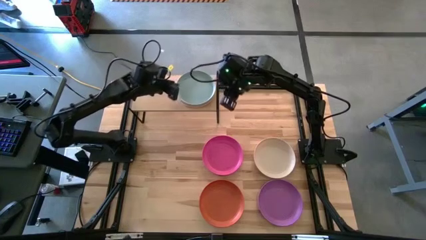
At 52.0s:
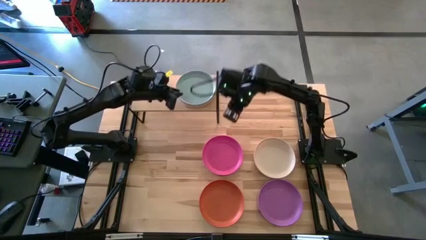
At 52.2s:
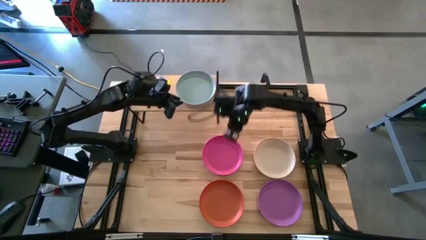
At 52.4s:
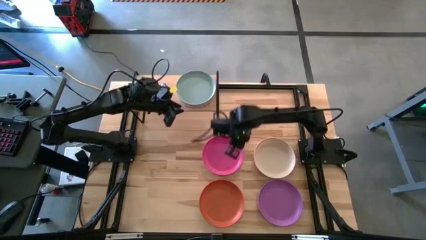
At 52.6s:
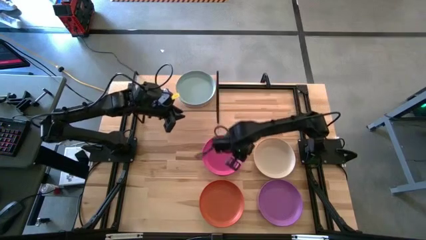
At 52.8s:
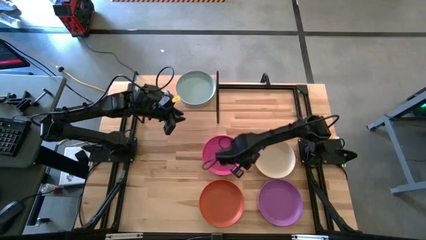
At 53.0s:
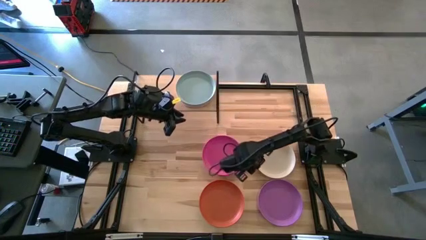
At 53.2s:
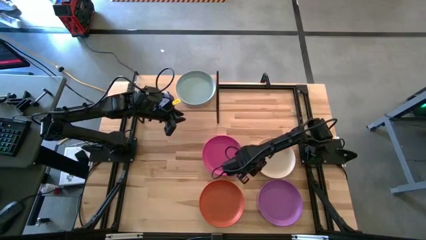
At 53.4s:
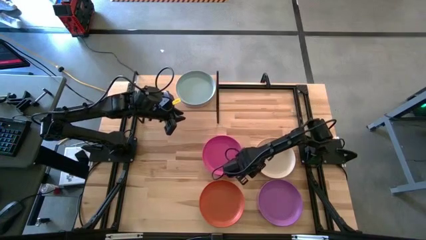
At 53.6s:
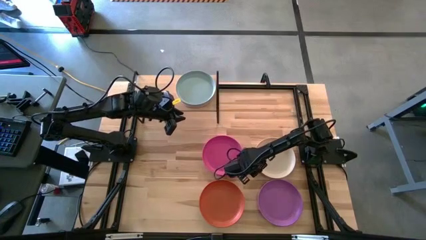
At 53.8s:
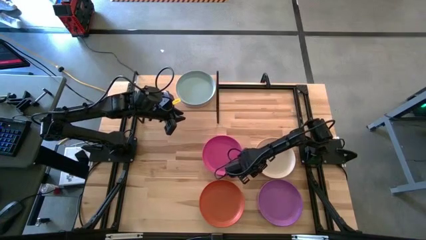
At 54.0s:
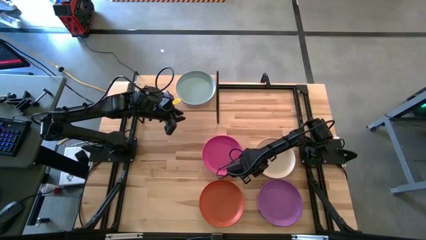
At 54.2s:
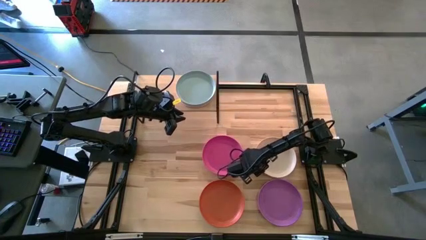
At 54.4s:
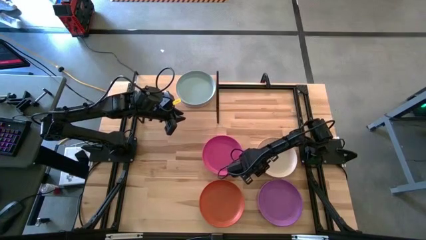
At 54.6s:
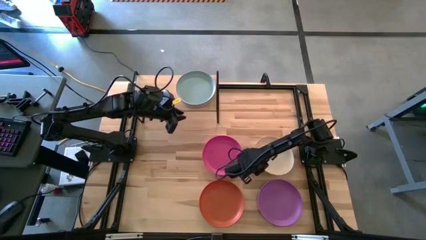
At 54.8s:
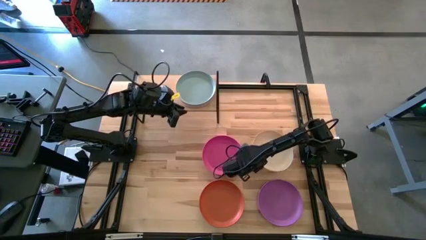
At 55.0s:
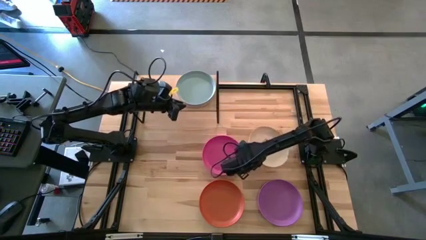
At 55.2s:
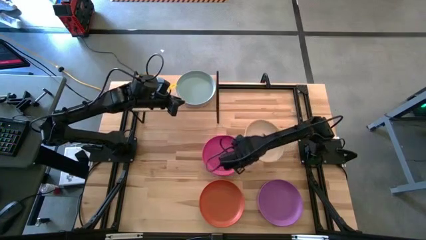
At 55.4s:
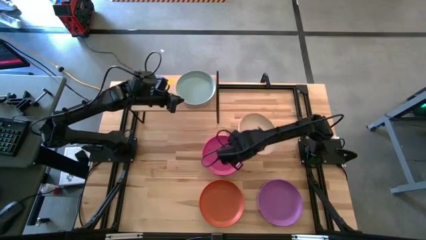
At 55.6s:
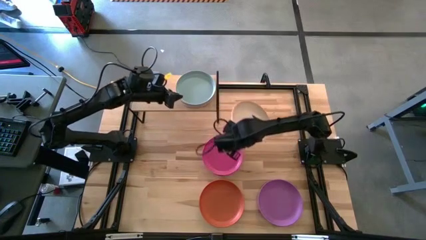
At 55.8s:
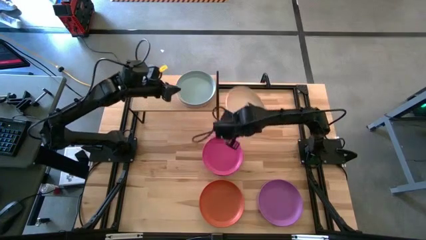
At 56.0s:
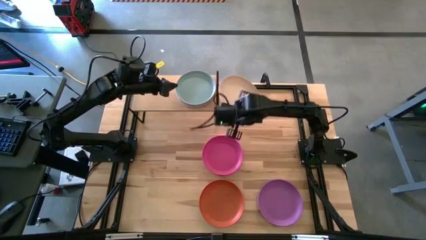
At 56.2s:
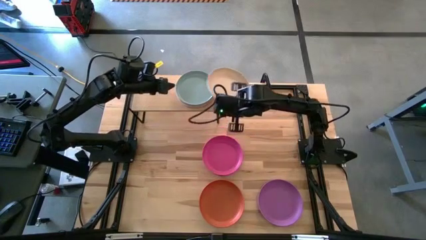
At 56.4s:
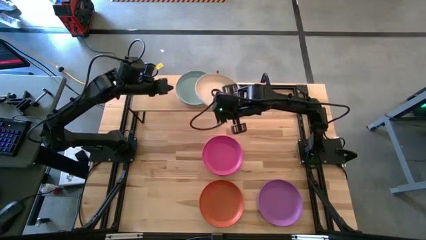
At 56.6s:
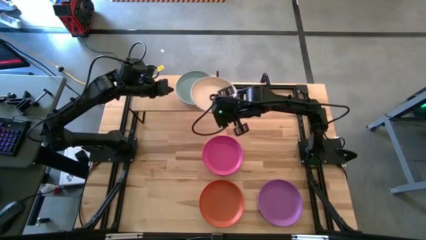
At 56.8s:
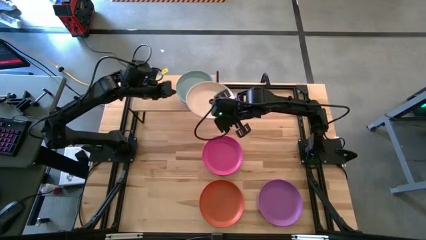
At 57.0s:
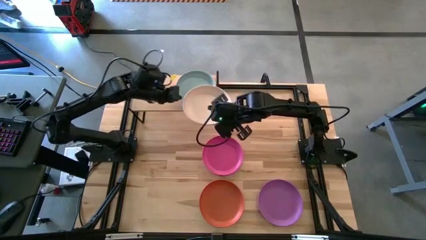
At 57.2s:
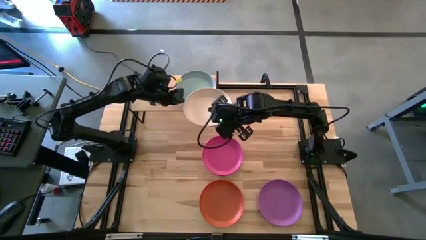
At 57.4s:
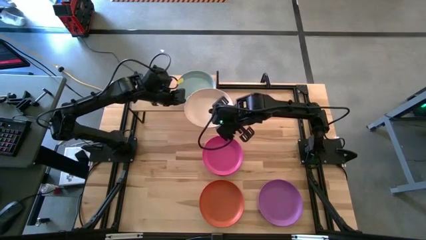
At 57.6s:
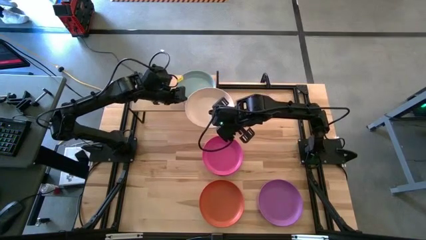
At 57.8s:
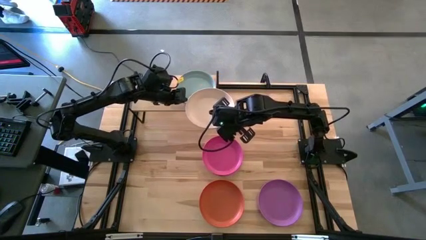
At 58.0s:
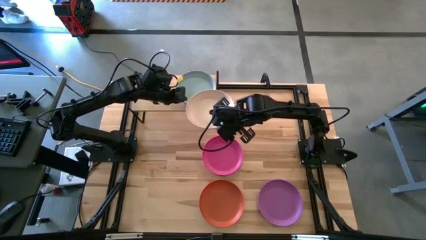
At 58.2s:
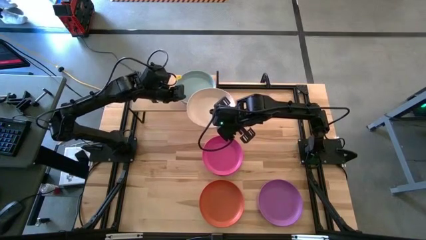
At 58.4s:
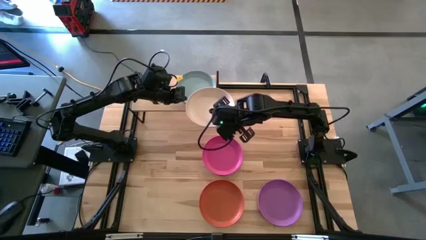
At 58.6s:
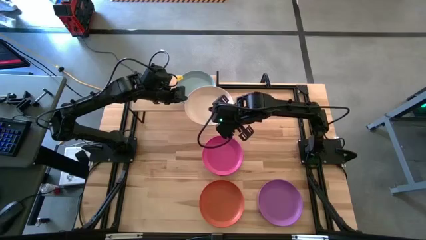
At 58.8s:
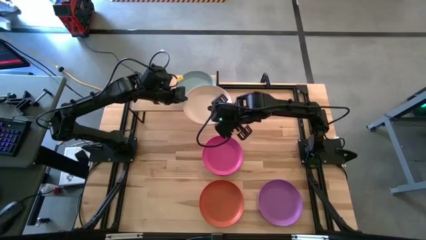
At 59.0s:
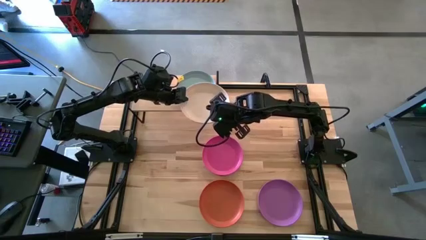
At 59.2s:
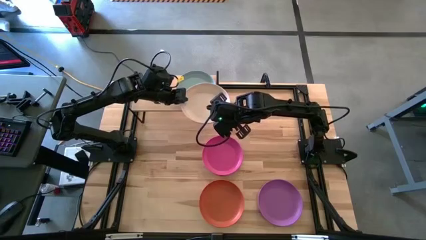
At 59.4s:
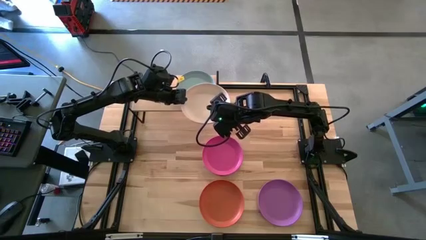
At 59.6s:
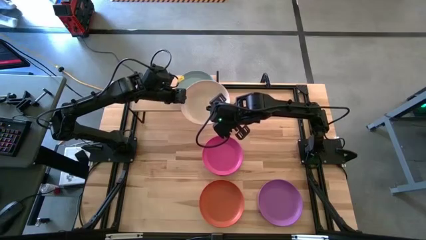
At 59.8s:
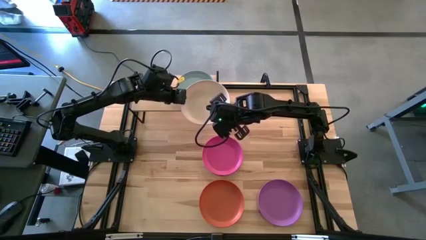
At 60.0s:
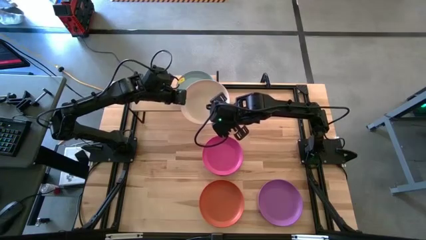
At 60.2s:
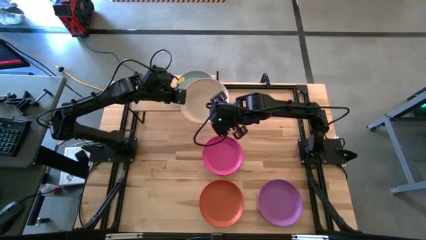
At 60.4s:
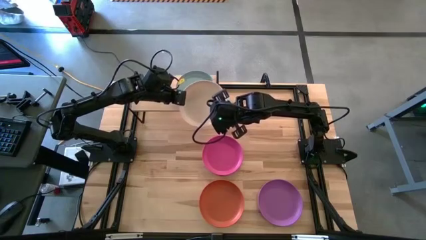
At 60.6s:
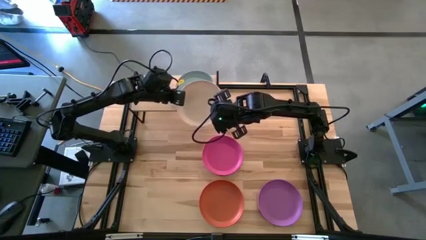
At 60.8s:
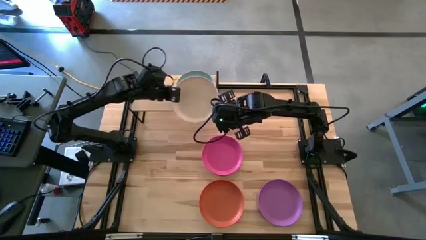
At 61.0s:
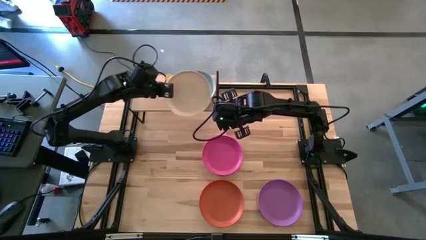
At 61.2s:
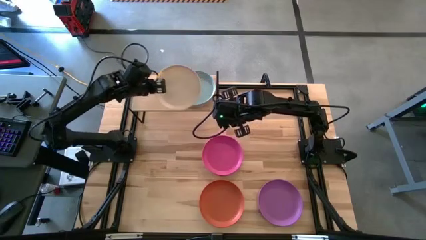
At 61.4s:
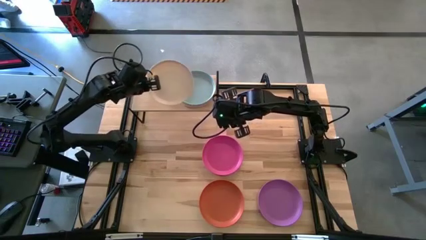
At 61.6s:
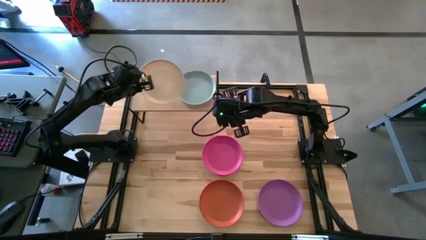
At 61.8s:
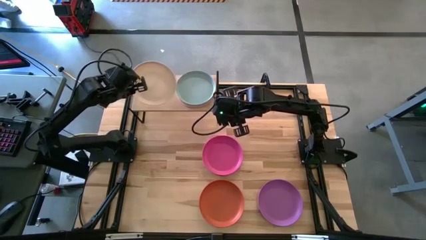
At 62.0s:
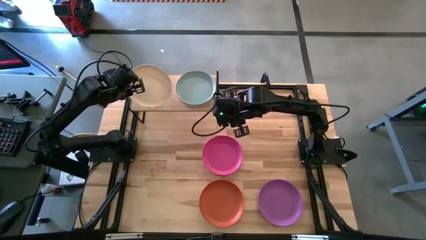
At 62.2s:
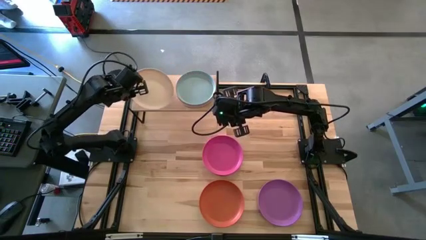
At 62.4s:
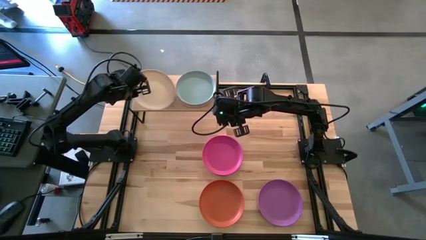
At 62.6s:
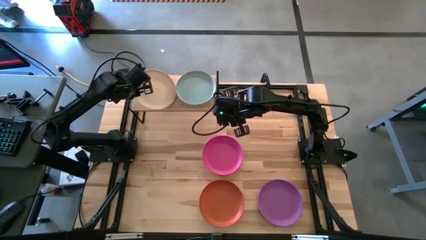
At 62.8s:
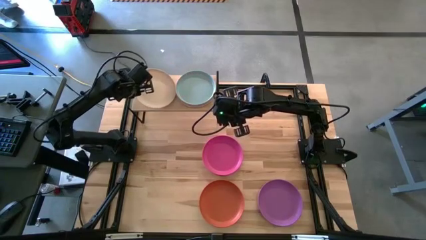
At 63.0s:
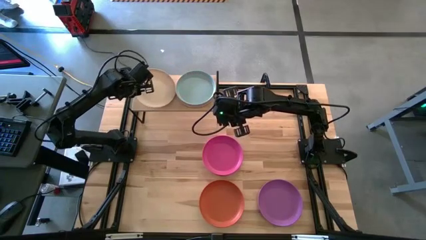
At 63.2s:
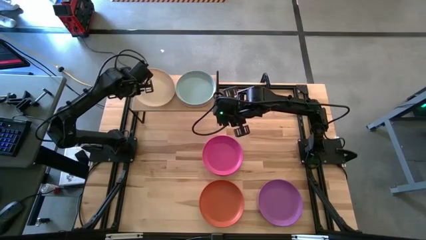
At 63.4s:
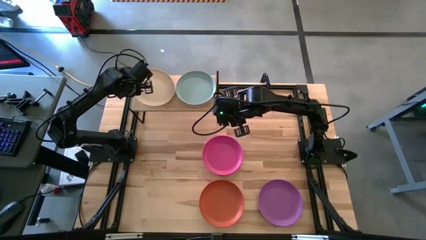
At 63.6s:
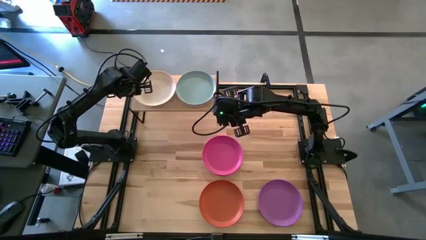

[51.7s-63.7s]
Task: Place and stack plates onto a shelf
Put the white plate on the shelf

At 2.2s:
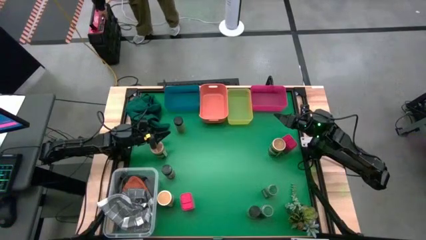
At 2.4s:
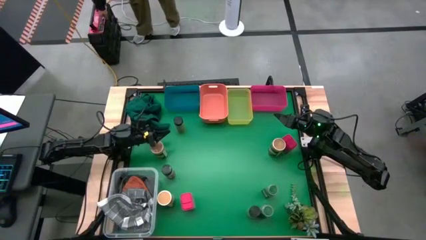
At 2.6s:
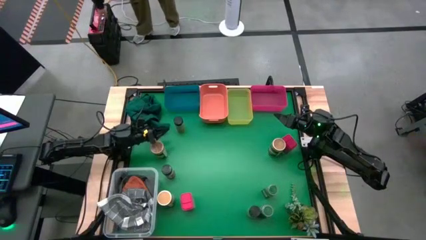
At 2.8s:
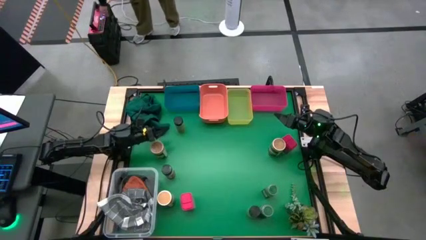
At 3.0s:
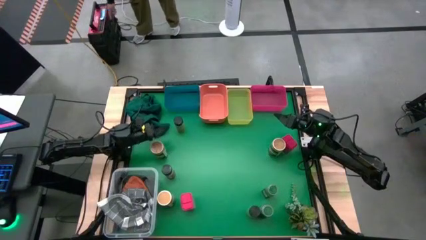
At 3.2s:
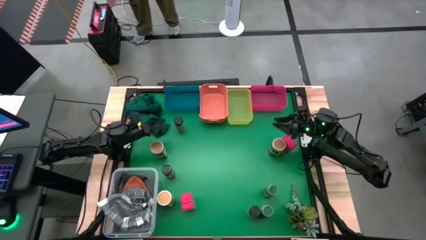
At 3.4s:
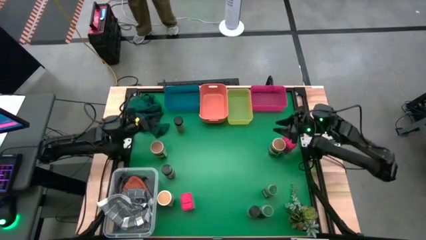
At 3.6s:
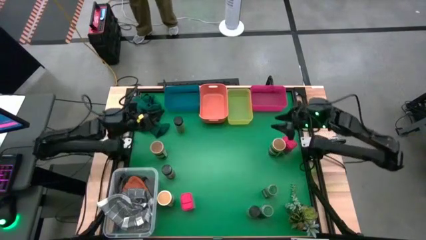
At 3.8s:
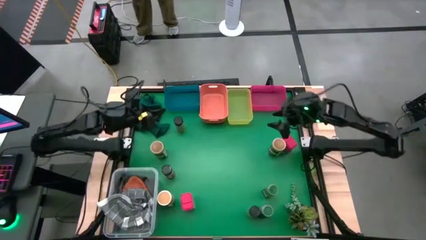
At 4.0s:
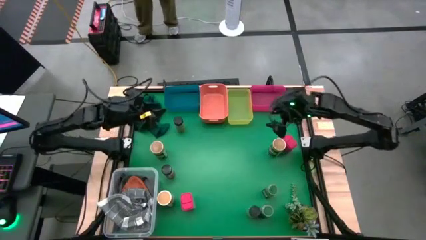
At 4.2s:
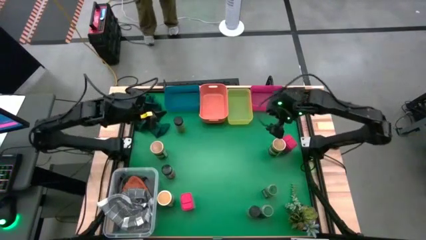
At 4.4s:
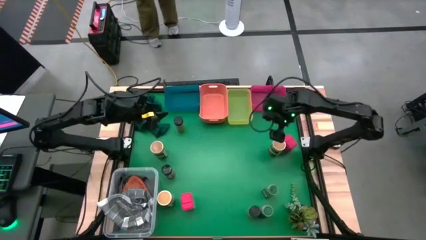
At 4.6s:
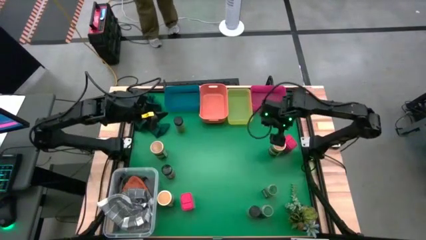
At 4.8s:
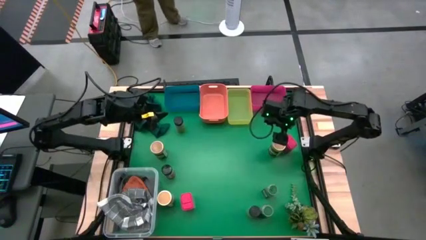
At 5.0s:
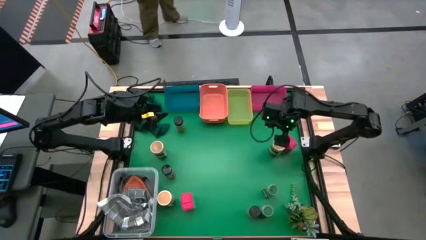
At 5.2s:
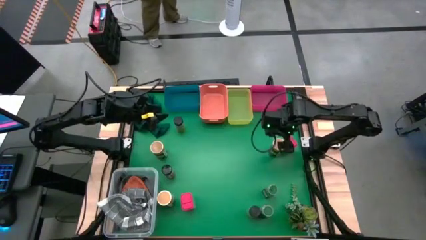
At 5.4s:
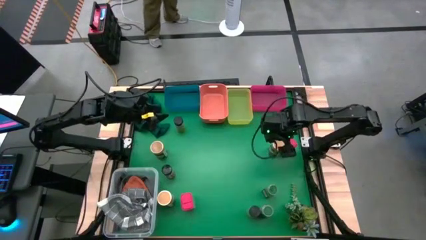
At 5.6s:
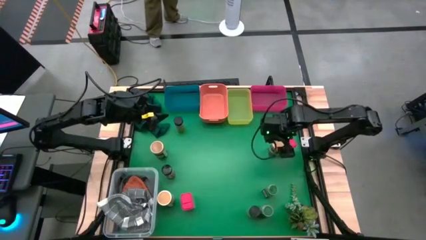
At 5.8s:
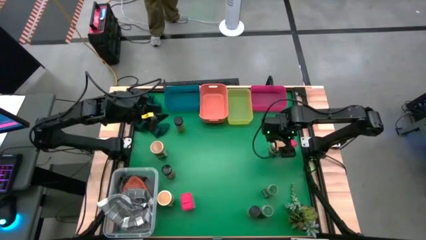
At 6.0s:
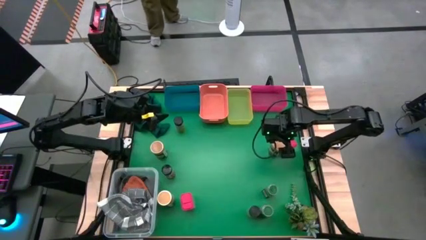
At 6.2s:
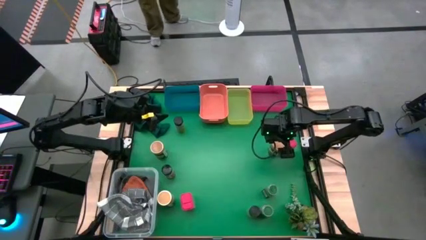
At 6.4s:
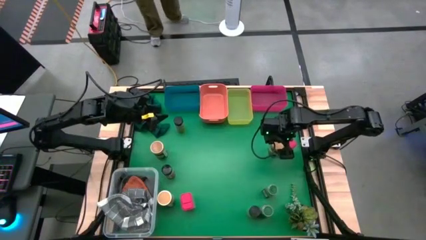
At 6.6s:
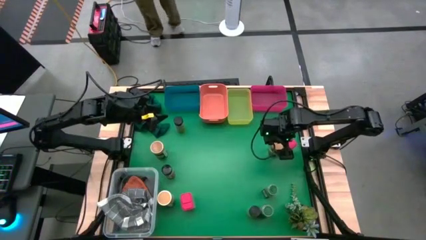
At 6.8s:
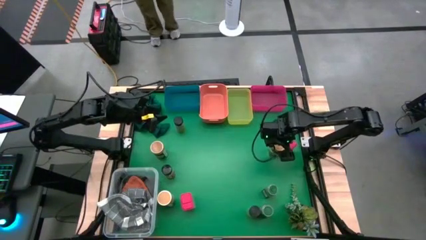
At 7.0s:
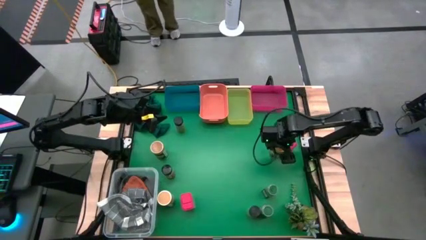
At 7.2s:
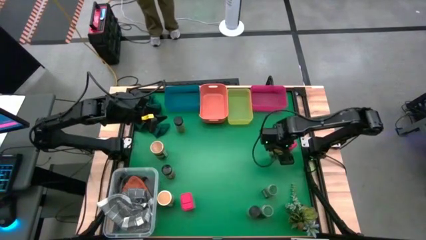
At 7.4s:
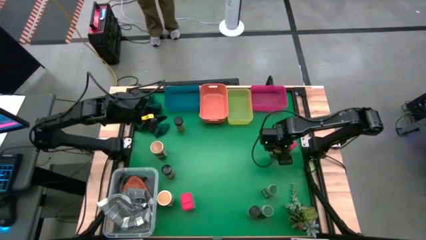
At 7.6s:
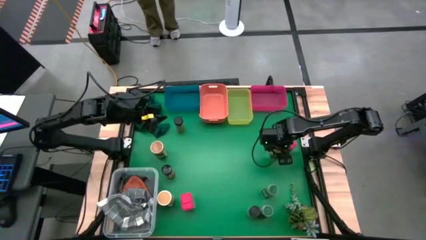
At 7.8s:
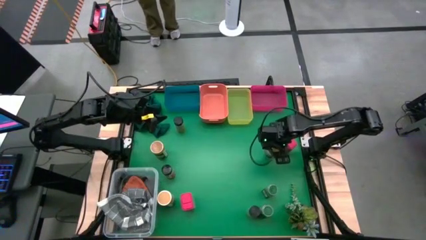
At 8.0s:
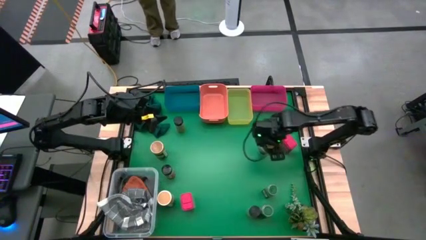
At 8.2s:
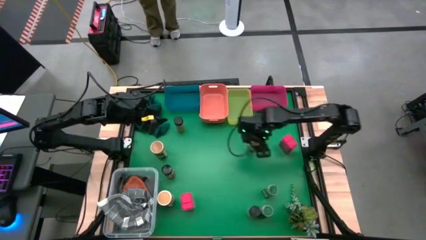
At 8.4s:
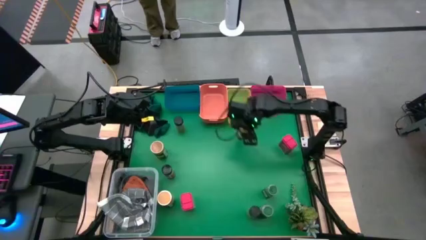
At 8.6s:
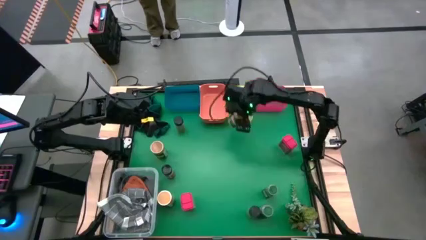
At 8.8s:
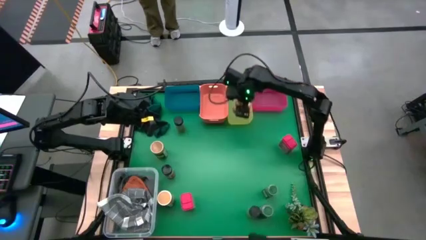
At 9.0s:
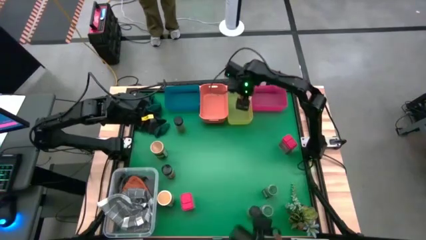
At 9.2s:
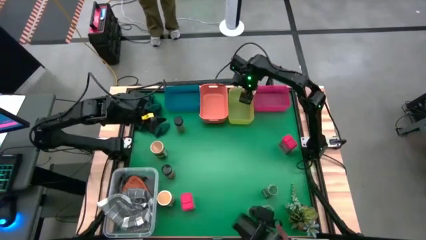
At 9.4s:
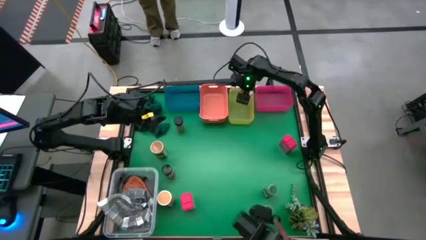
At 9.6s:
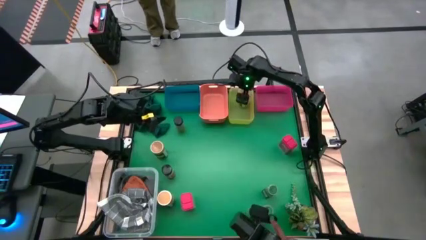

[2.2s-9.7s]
Task: Sort spices by type
Put the top right yellow seasoning bottle into the yellow bin
